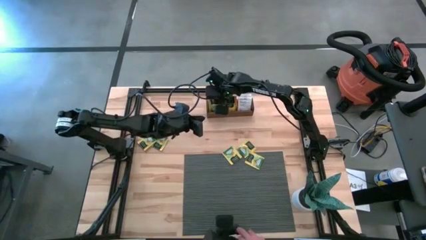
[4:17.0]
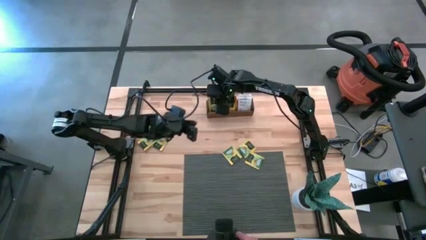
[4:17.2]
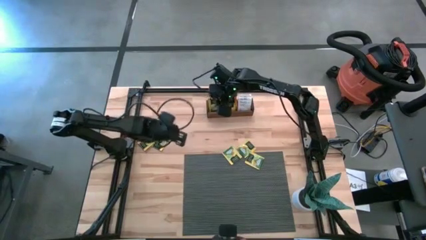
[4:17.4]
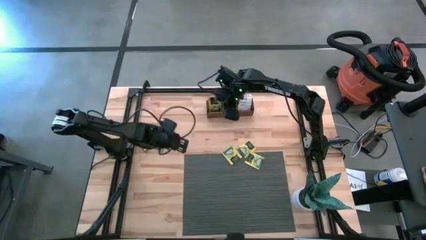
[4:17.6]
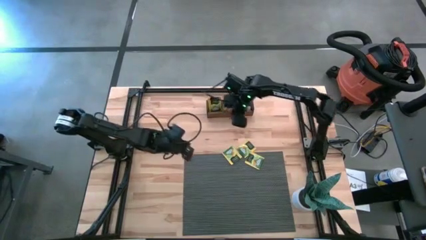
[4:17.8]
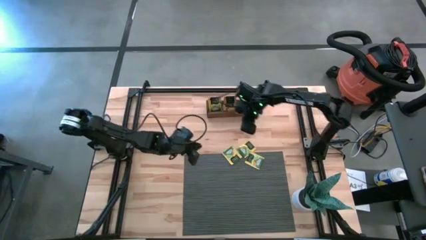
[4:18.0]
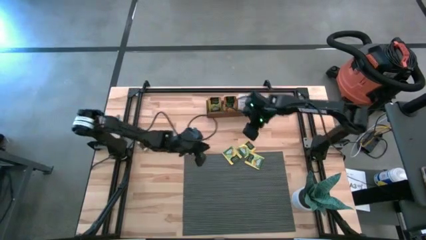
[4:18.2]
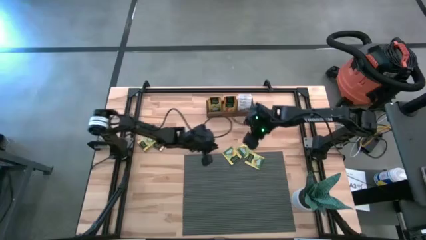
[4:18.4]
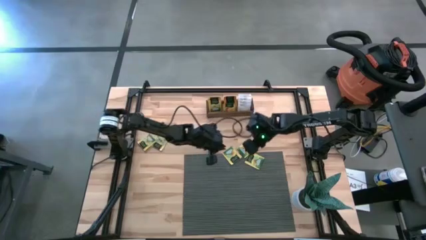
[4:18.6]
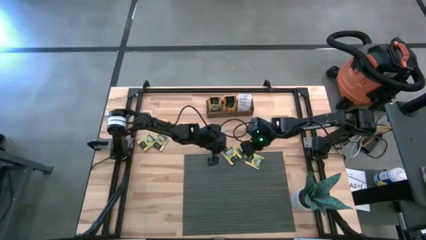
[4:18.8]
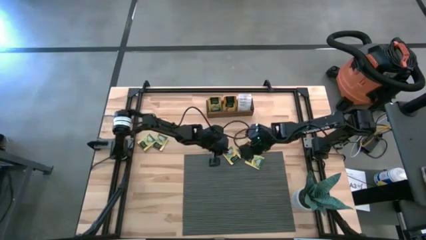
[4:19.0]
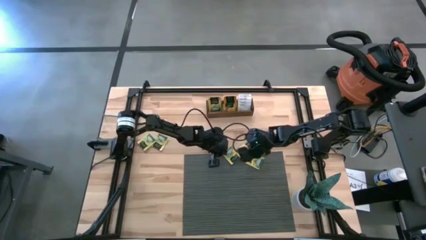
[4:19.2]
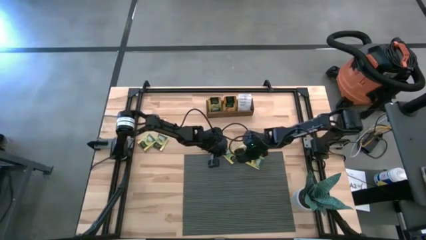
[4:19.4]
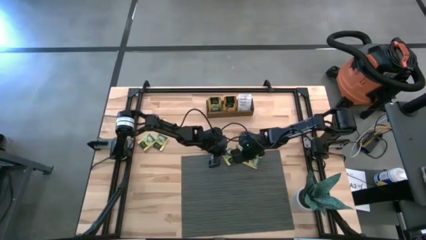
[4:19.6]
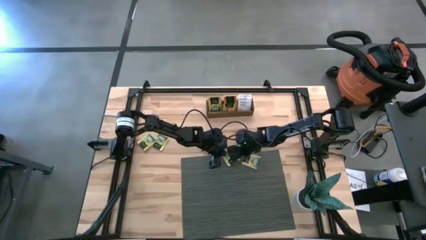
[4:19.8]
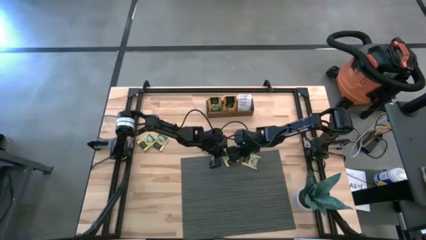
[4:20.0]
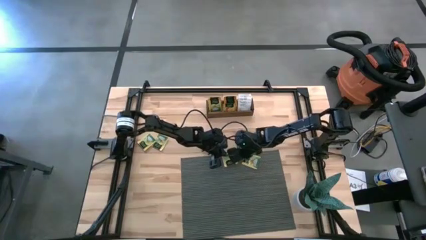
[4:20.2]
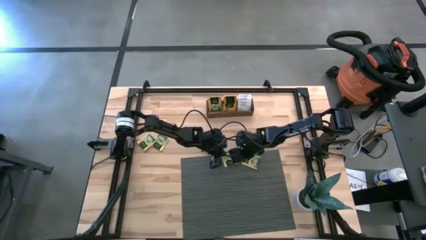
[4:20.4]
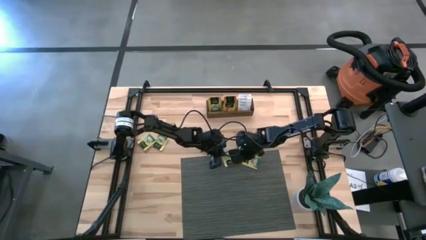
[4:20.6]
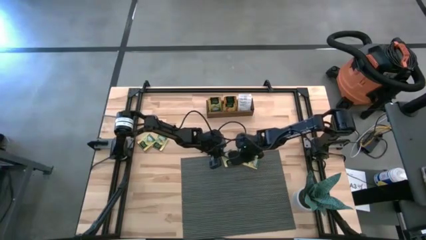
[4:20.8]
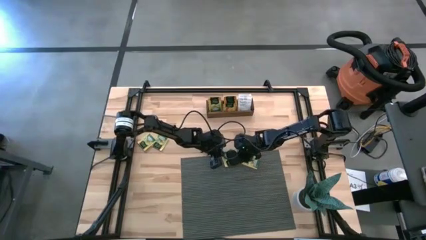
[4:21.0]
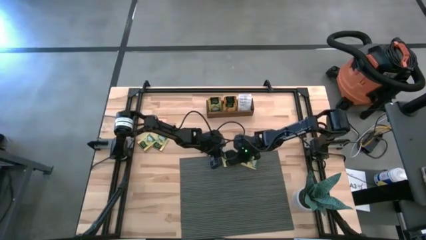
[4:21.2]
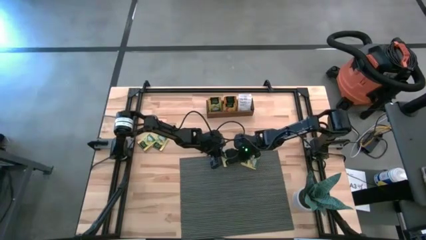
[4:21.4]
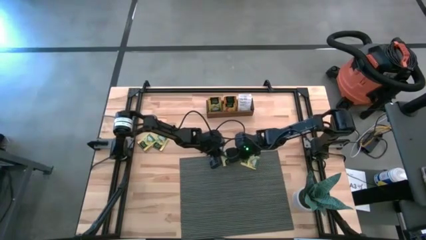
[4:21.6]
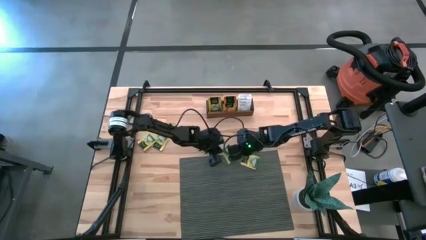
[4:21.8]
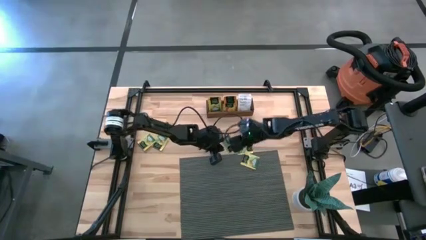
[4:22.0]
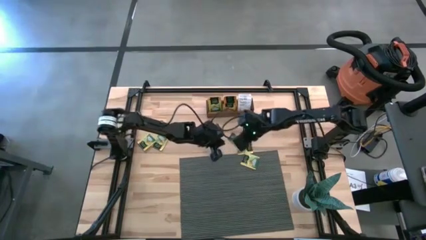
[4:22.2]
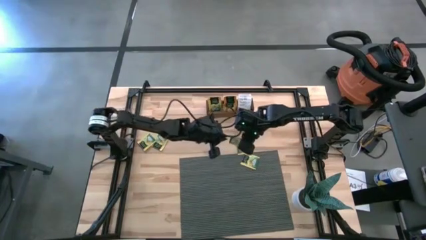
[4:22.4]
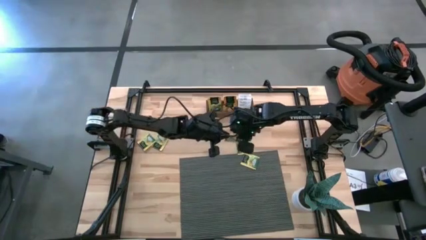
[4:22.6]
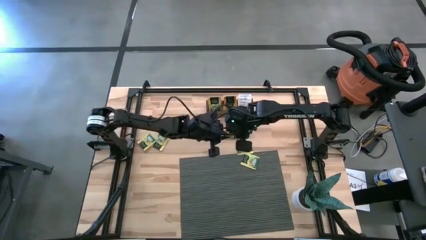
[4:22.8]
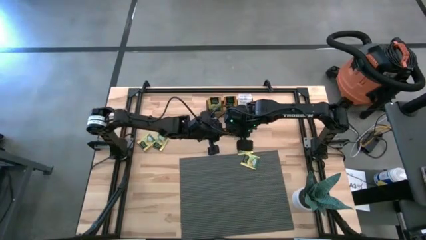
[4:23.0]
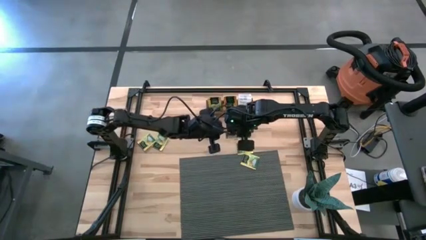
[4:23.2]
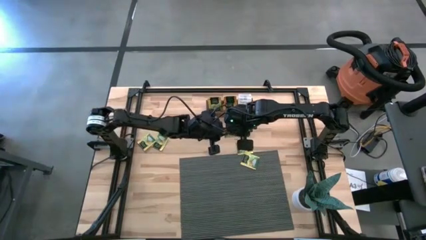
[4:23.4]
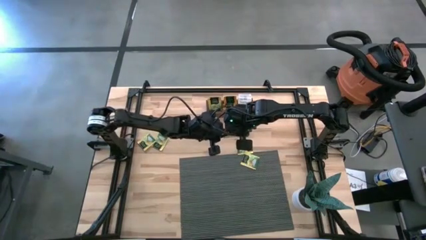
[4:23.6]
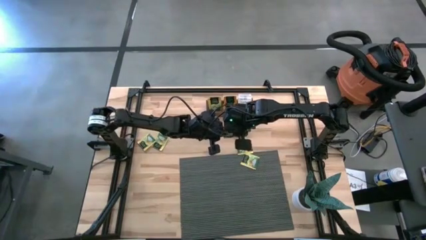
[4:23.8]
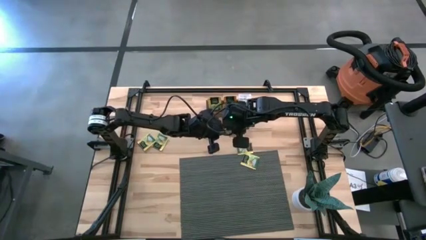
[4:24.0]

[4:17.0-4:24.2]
Task: Pick & Place Tea
Put the yellow tea bag into the left section of the wooden organizer

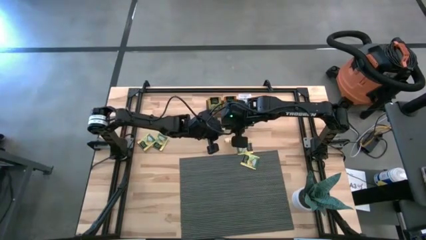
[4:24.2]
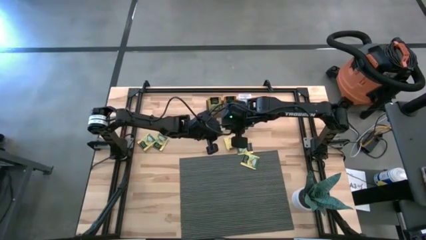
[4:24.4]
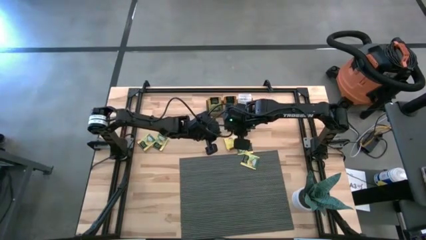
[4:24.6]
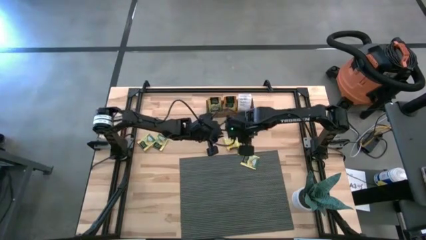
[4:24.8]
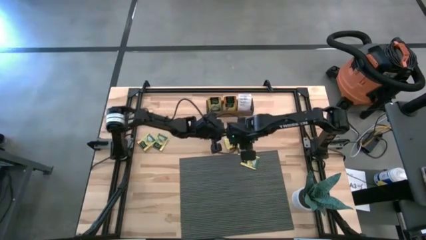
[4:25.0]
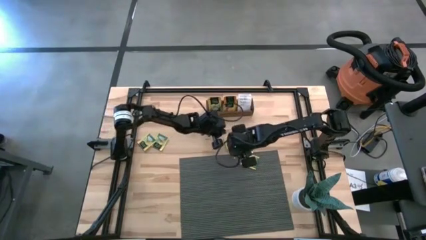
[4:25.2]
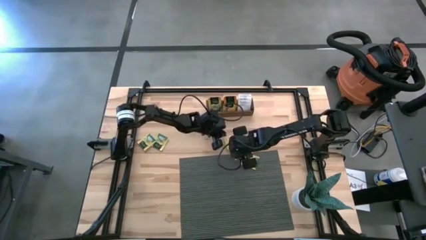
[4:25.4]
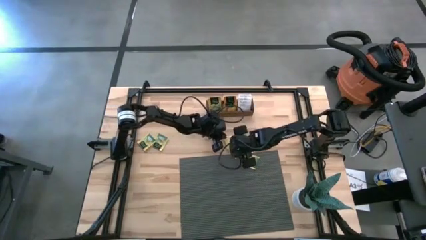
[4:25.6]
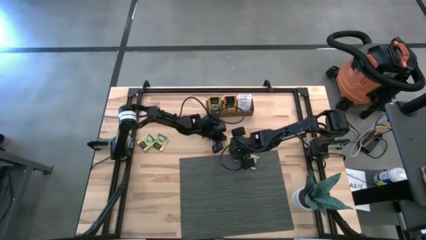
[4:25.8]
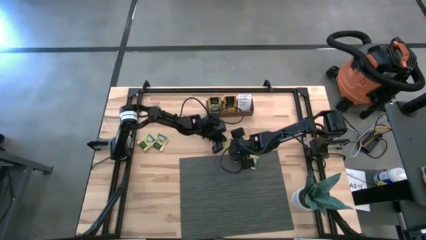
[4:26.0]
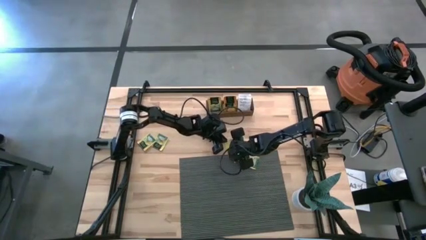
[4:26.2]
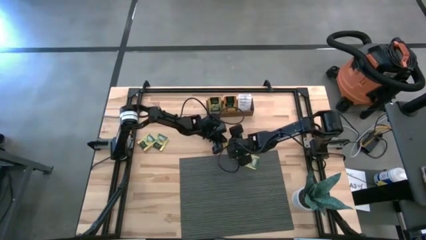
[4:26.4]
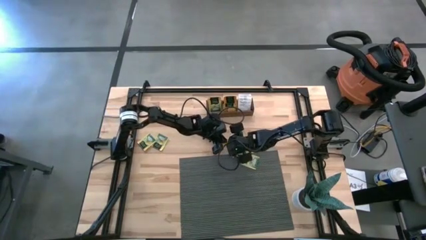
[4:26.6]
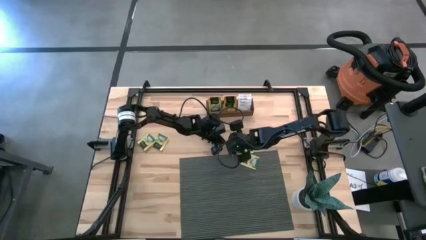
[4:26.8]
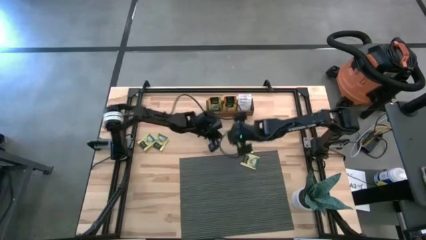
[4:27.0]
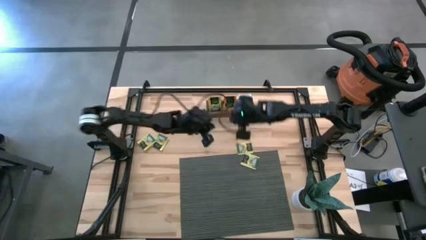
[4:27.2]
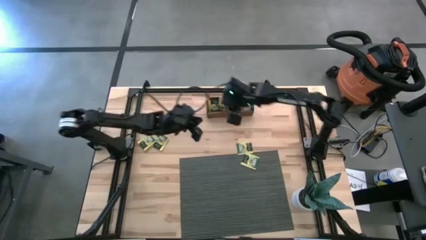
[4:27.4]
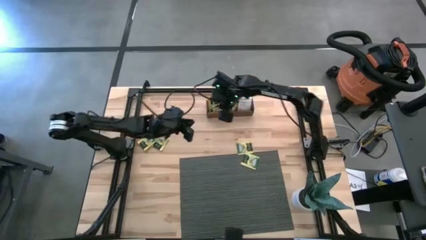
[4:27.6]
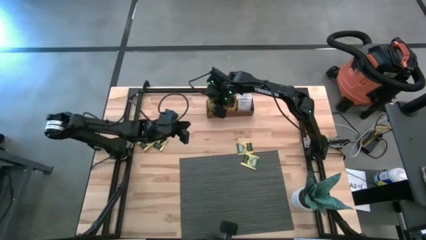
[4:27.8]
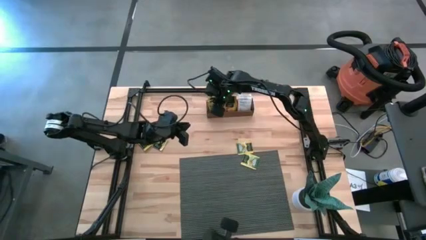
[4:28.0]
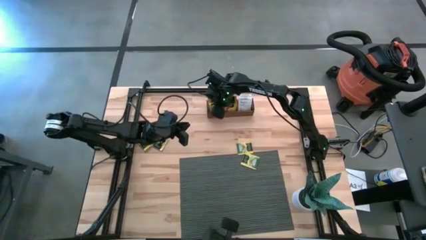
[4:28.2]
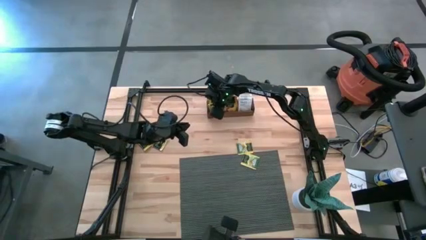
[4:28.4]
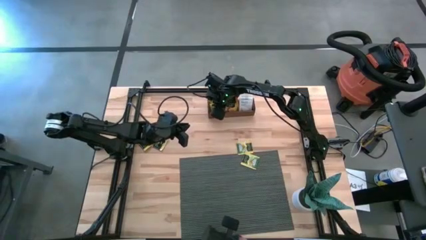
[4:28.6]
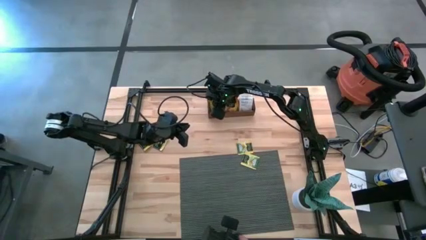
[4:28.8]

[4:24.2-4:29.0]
Put the yellow tea bag into the left section of the wooden organizer

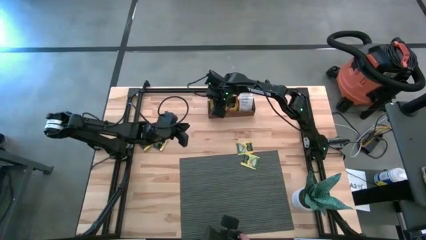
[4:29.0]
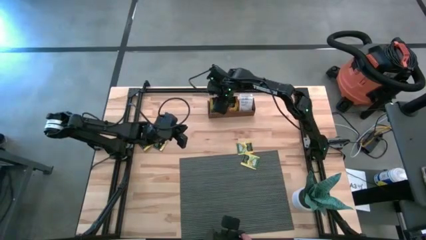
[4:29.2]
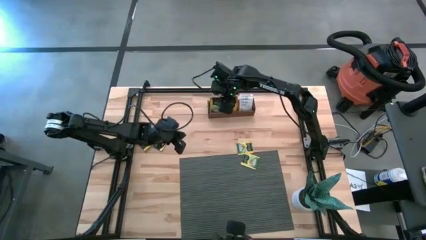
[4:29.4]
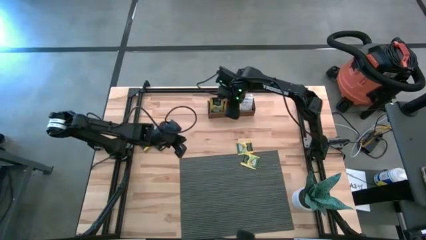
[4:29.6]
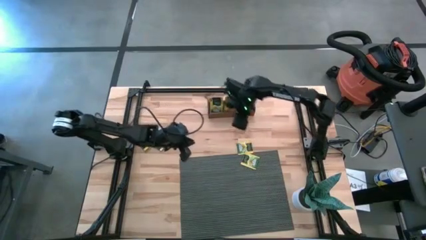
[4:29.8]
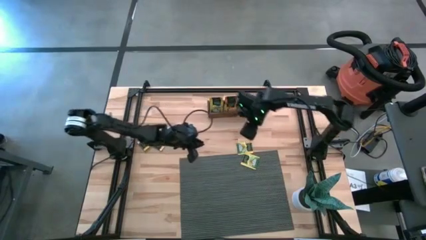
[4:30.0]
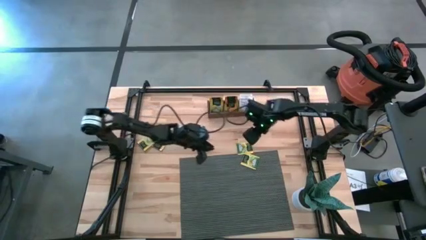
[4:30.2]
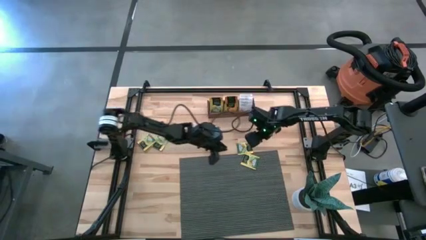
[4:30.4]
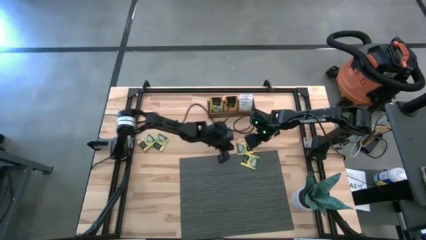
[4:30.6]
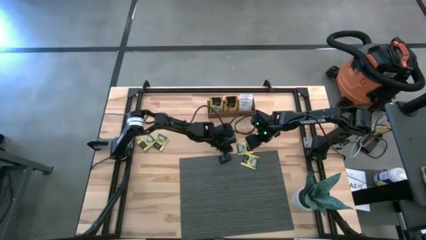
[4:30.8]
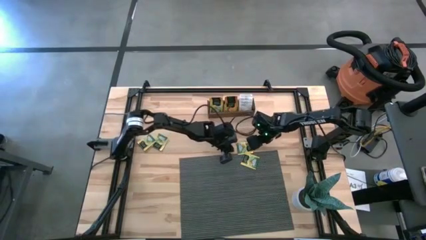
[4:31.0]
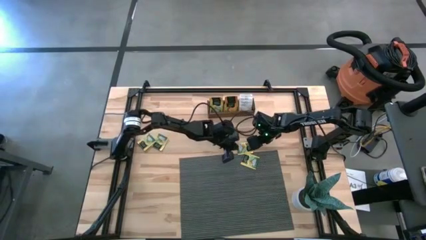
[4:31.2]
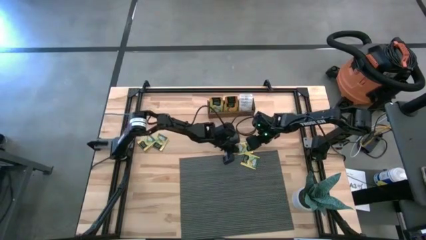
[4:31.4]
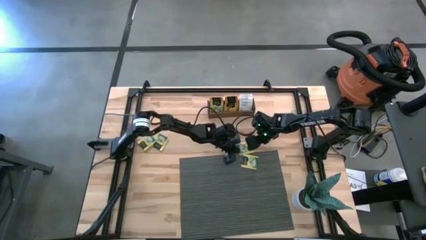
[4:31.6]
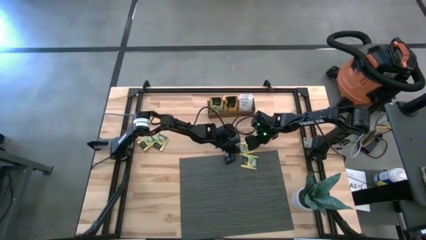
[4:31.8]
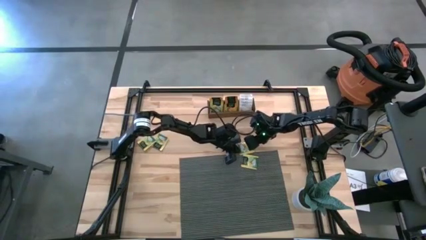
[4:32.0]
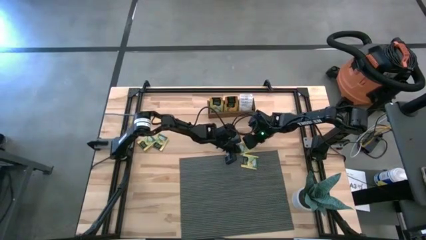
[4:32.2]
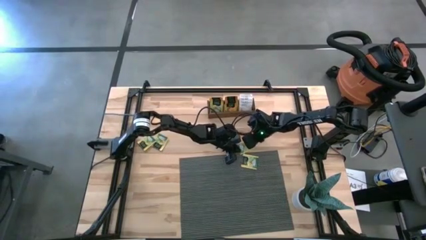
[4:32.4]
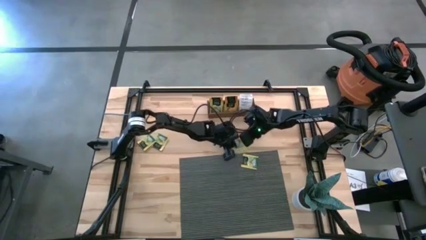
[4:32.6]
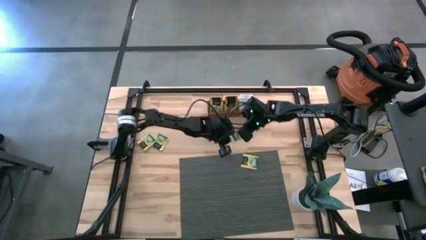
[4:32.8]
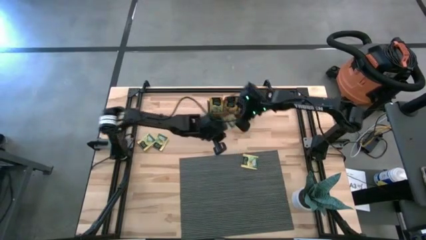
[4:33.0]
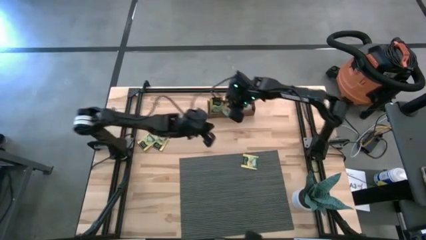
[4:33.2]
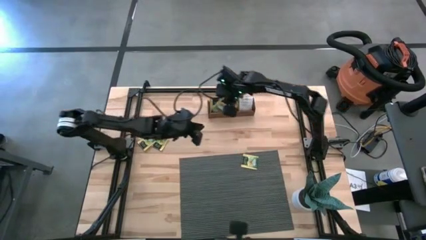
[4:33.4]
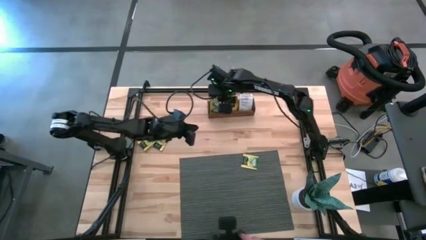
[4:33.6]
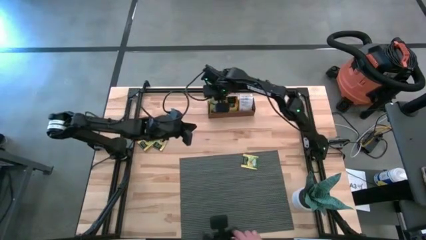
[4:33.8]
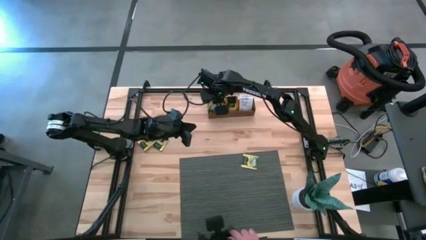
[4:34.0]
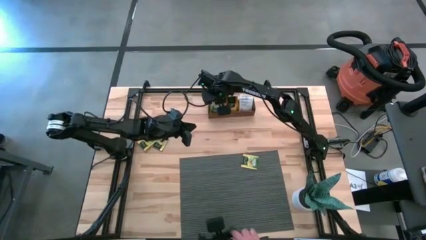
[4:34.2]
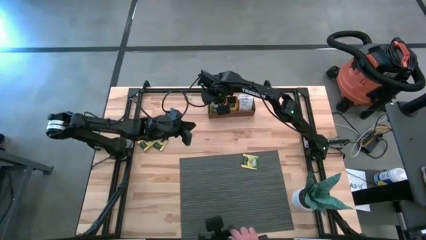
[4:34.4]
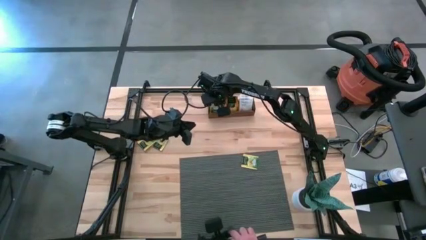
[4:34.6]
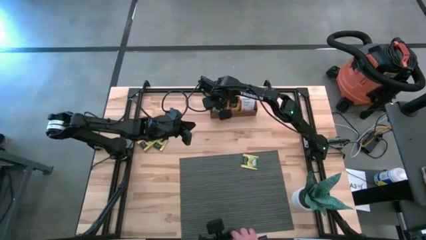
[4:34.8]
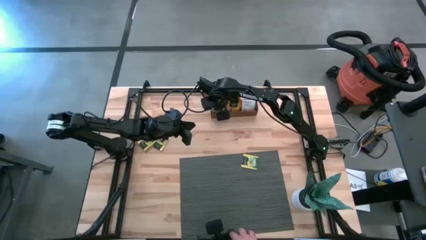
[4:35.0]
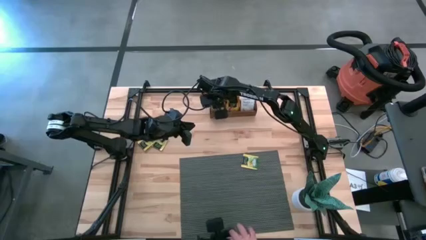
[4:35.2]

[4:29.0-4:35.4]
Put the yellow tea bag into the left section of the wooden organizer
